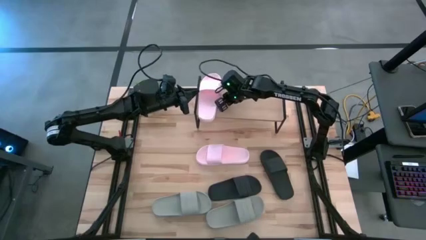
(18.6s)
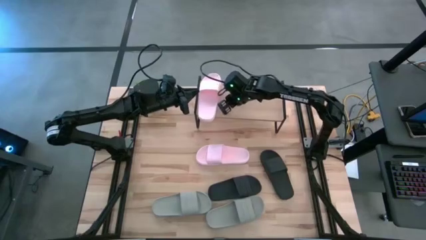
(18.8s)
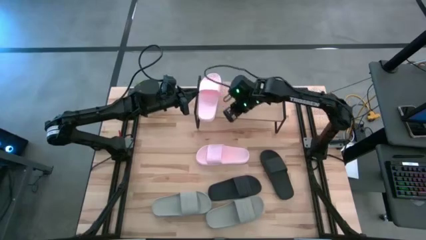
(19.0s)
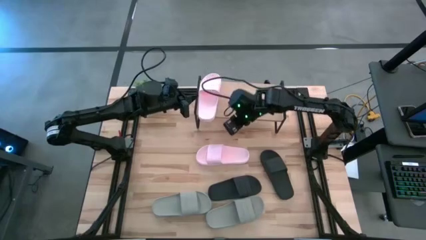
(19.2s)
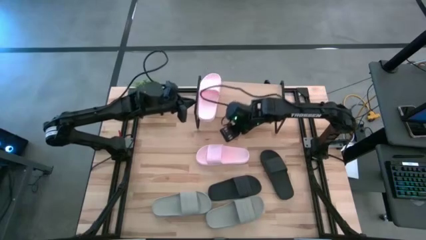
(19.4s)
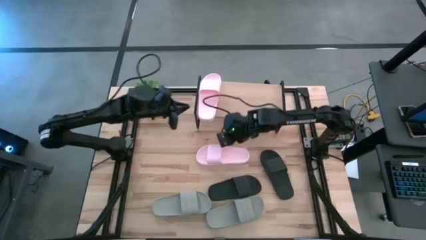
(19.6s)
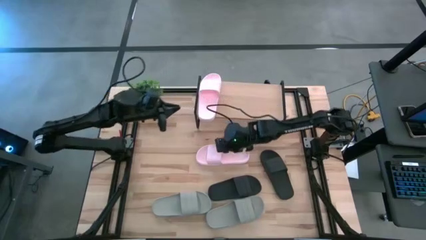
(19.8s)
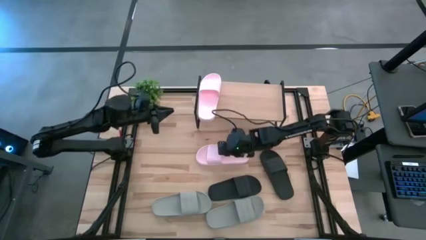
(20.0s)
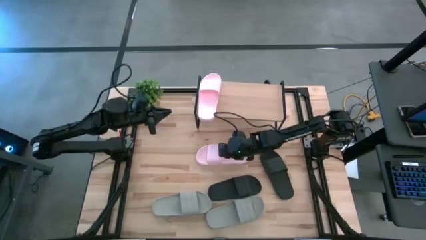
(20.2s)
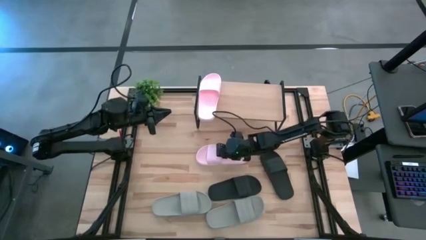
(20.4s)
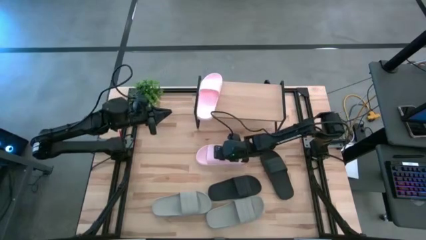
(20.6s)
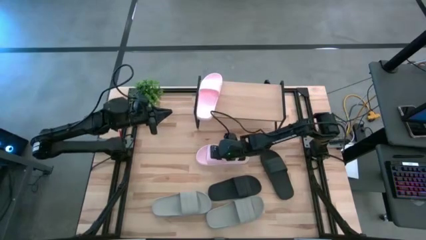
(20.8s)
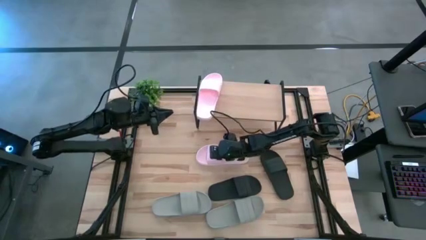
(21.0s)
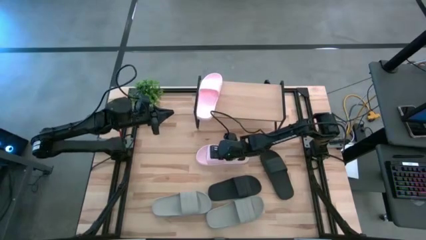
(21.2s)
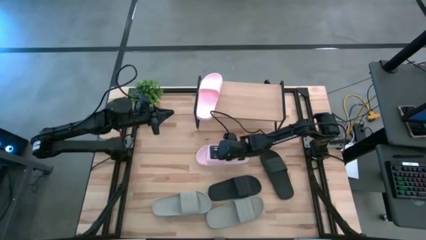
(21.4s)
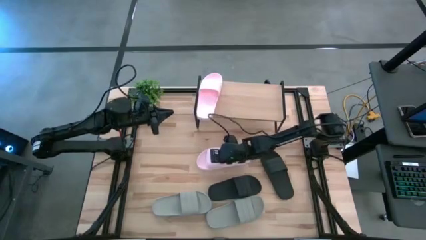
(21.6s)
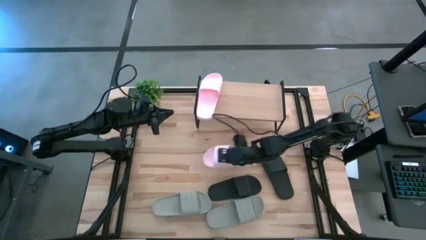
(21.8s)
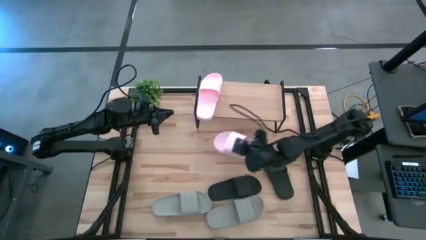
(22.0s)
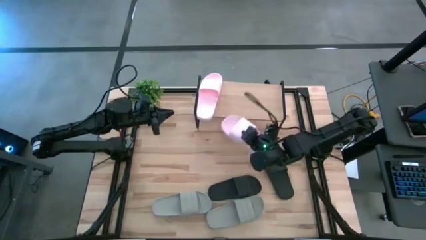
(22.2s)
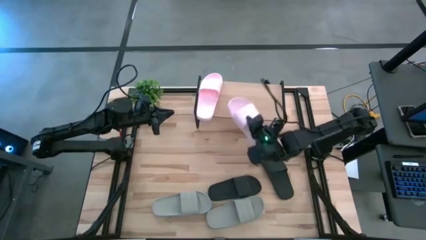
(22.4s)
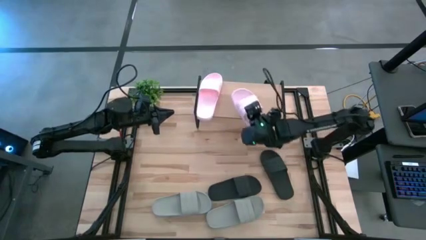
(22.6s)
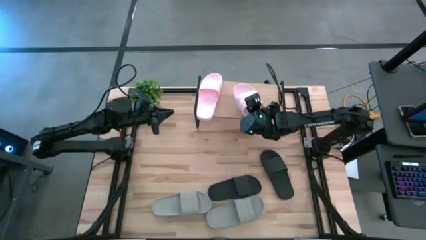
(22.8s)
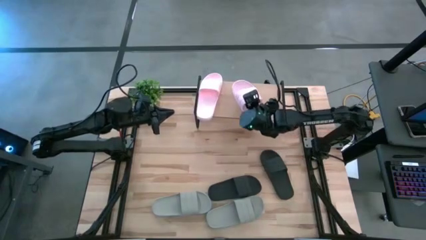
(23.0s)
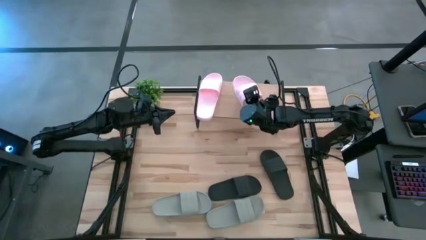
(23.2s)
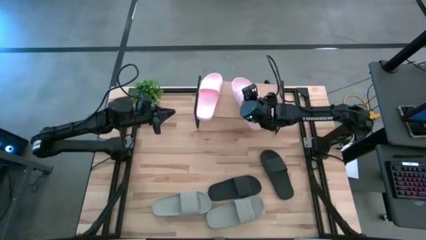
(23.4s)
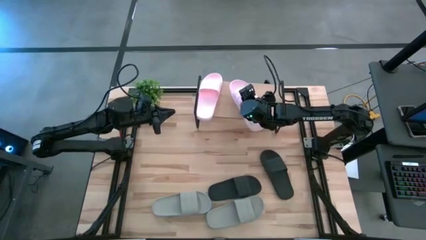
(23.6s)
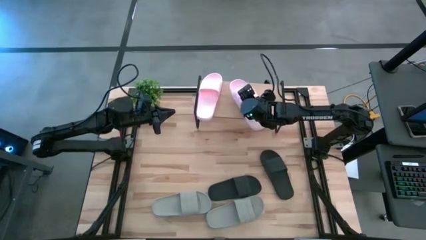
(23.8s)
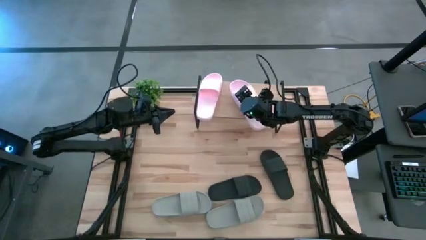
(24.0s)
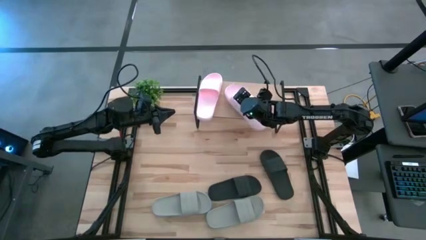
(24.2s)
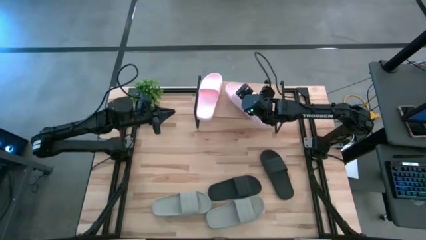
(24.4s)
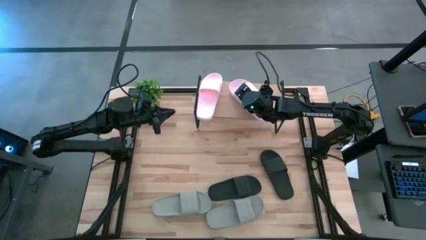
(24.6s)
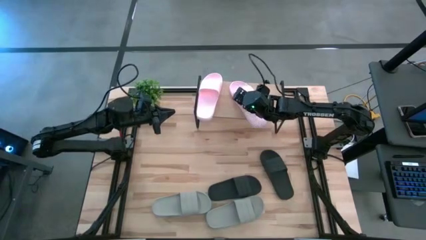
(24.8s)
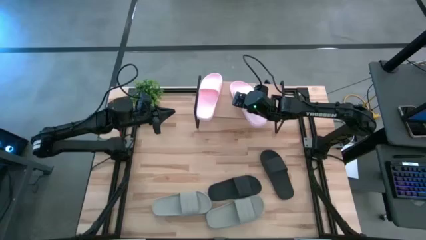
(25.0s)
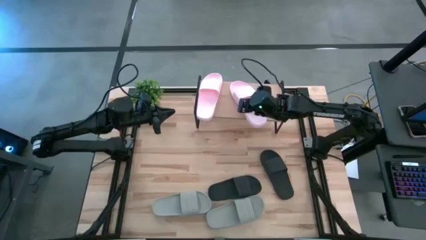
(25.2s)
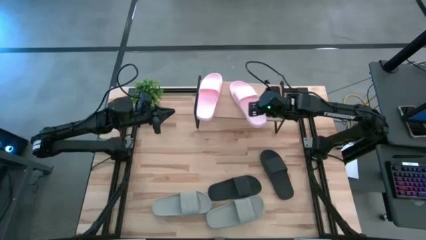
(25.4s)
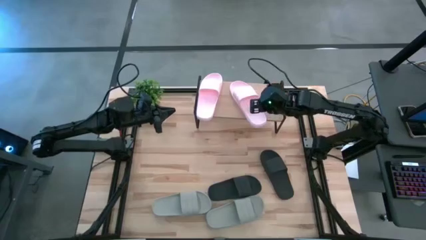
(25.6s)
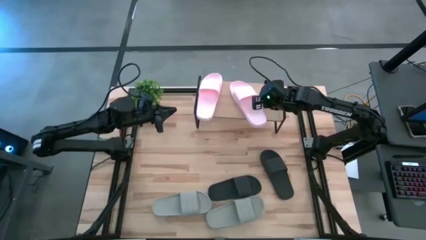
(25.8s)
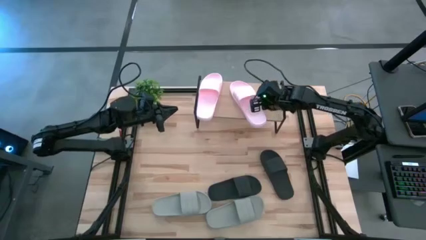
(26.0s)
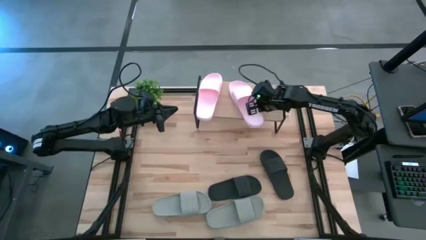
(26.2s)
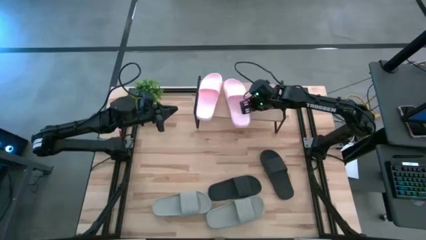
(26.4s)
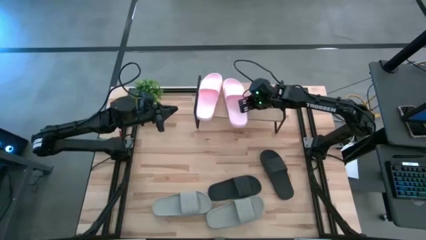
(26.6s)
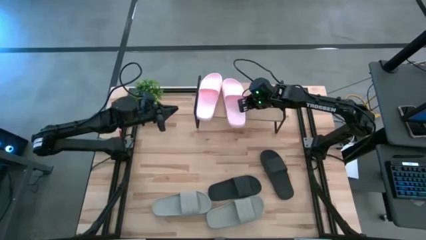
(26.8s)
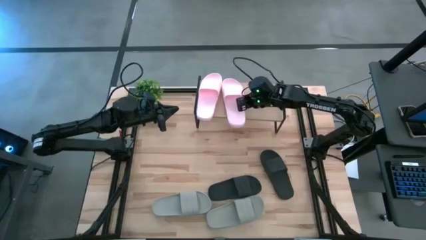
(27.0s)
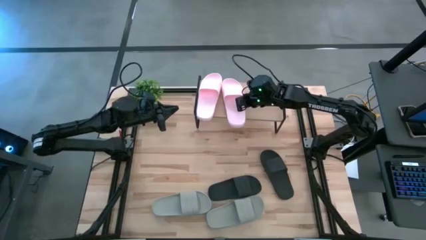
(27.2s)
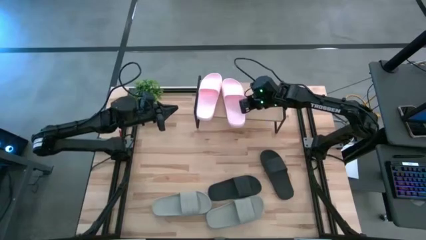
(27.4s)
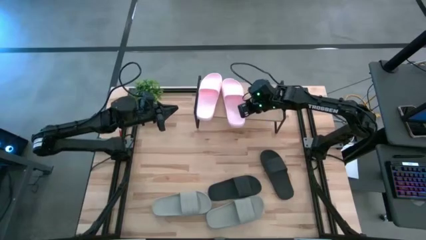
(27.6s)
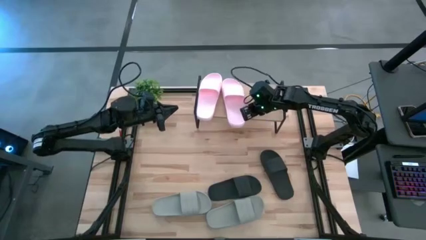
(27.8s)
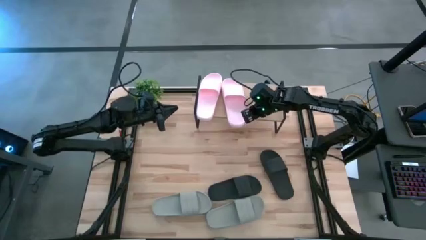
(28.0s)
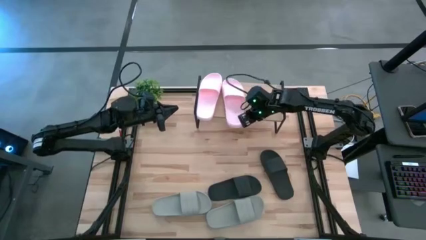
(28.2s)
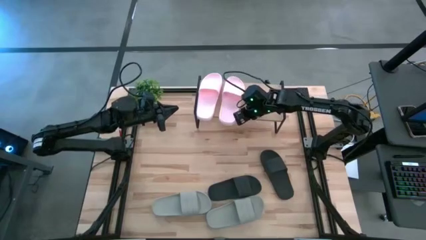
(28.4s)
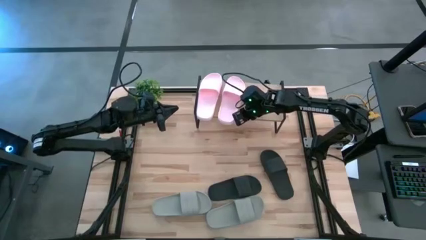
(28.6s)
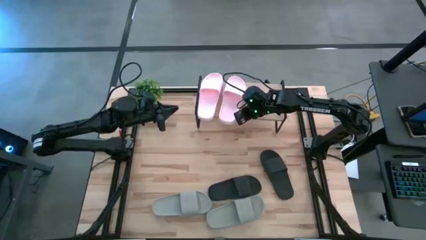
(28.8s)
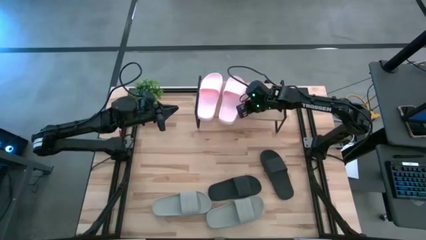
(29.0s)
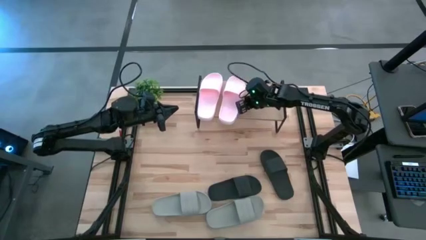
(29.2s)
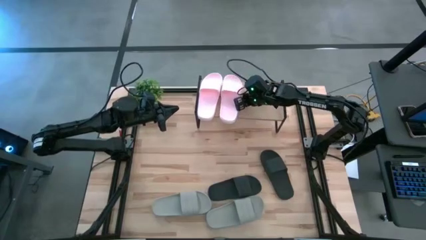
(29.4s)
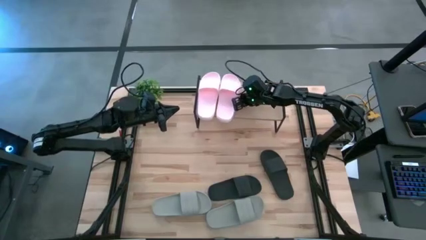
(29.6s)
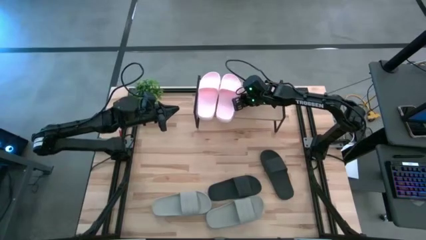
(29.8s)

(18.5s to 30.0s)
Task: Pick and place slides into the shelf
Put the pink slide on the shelf
